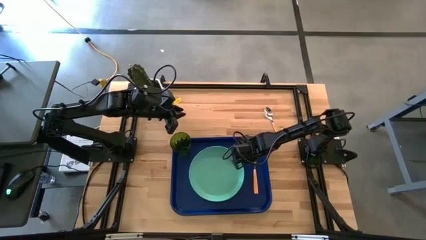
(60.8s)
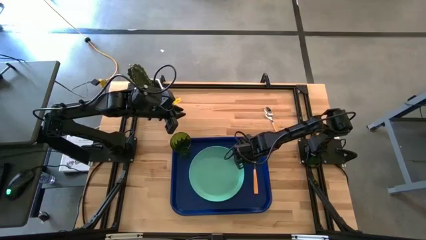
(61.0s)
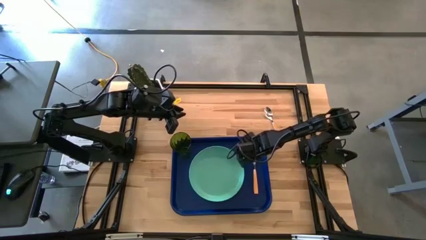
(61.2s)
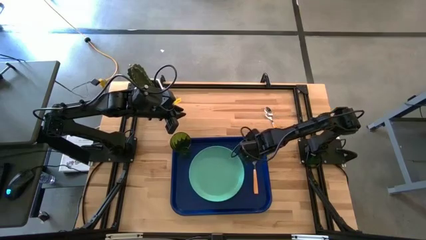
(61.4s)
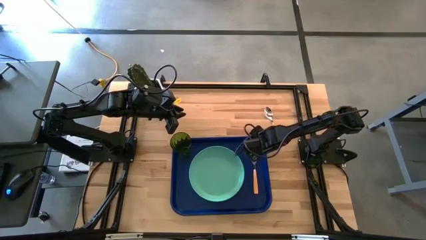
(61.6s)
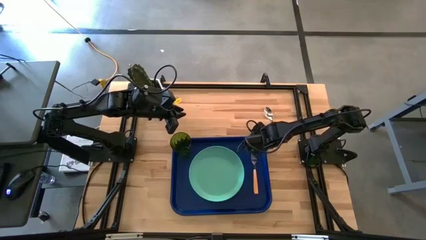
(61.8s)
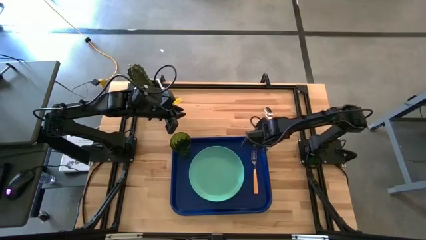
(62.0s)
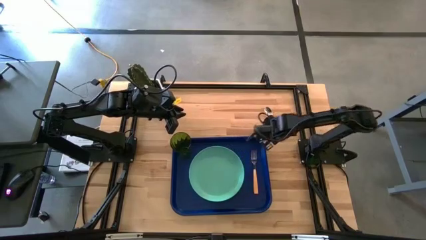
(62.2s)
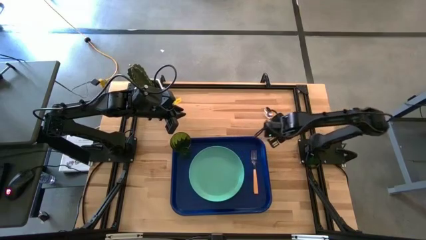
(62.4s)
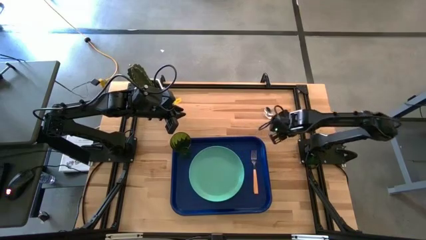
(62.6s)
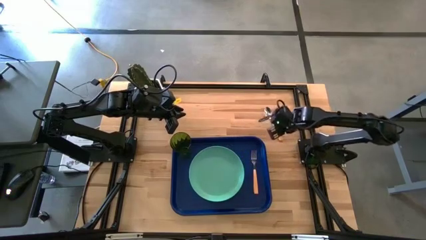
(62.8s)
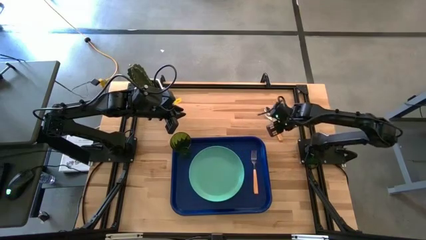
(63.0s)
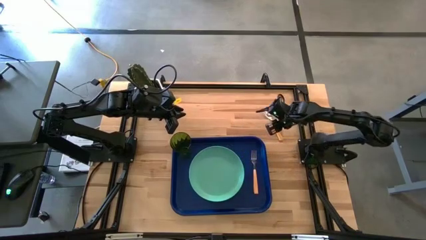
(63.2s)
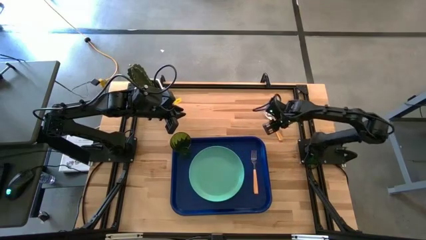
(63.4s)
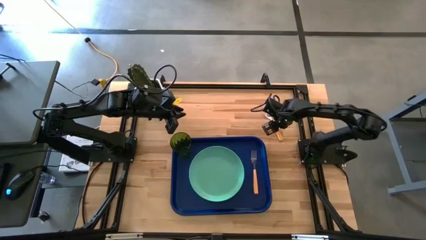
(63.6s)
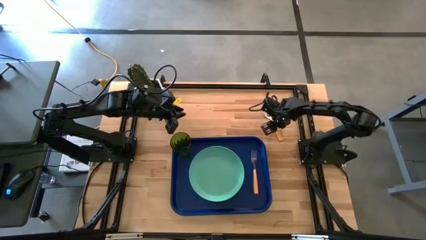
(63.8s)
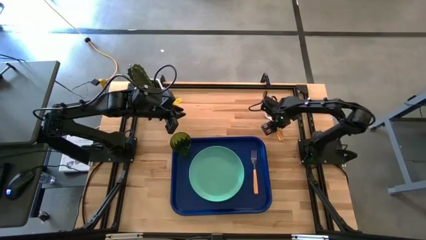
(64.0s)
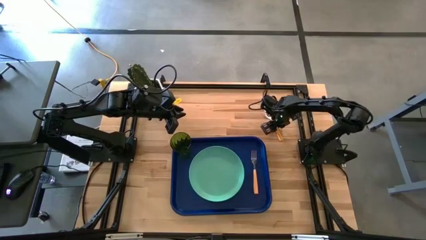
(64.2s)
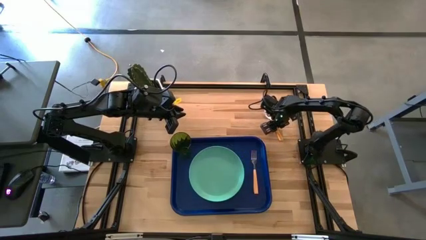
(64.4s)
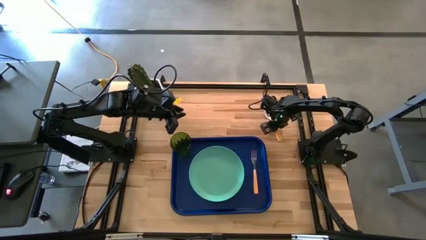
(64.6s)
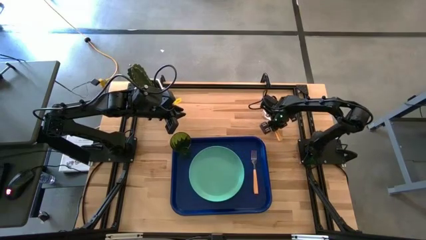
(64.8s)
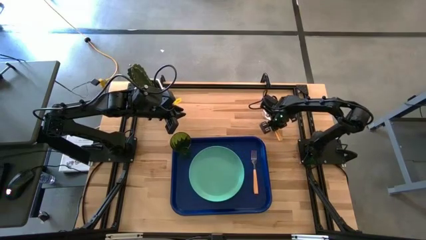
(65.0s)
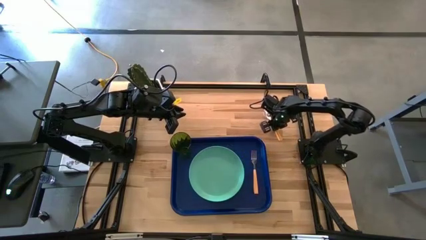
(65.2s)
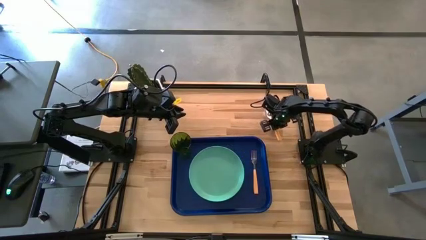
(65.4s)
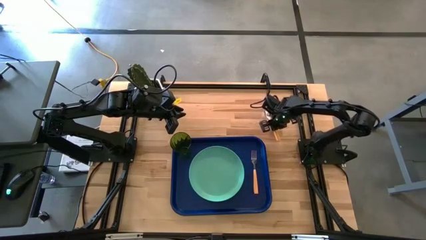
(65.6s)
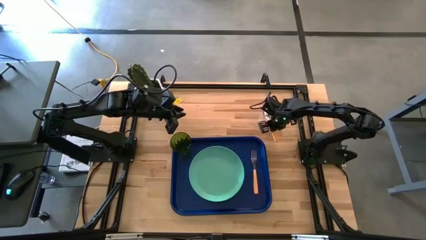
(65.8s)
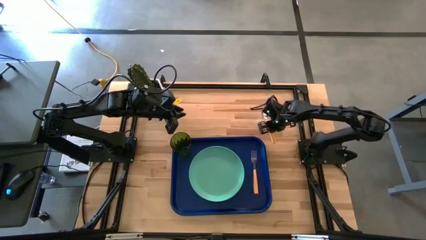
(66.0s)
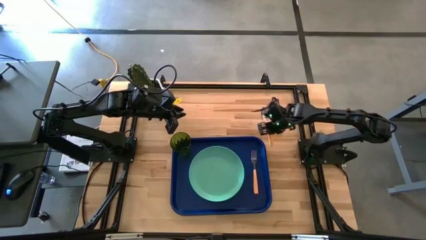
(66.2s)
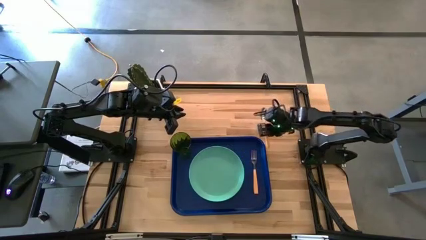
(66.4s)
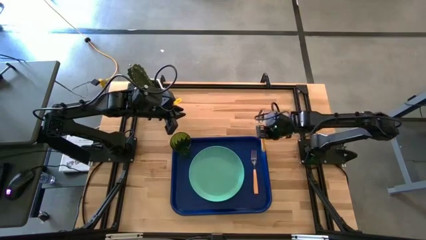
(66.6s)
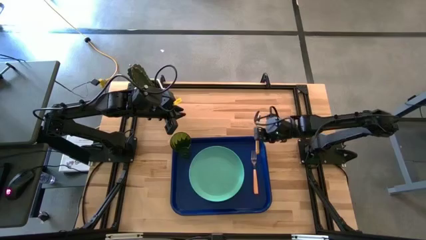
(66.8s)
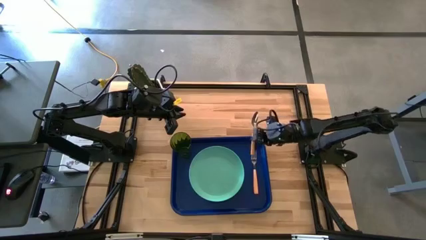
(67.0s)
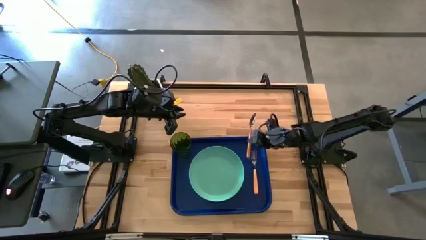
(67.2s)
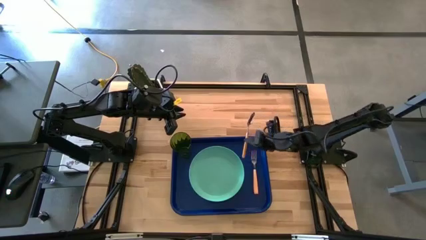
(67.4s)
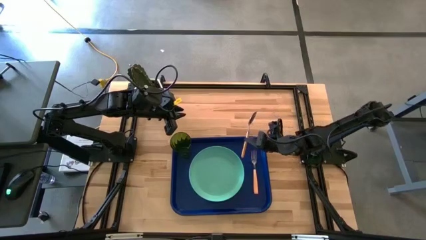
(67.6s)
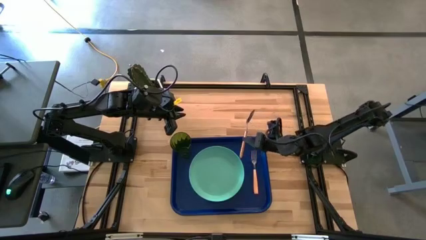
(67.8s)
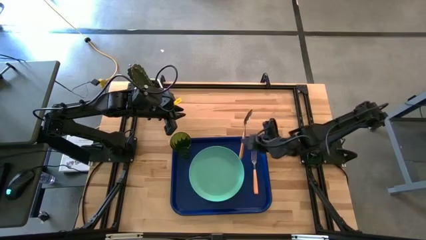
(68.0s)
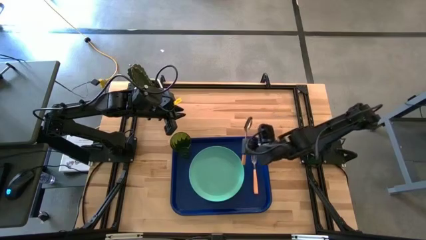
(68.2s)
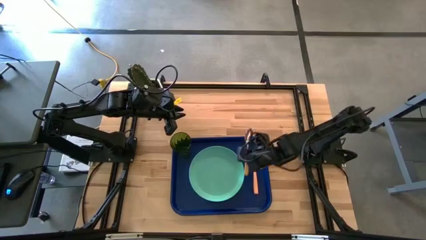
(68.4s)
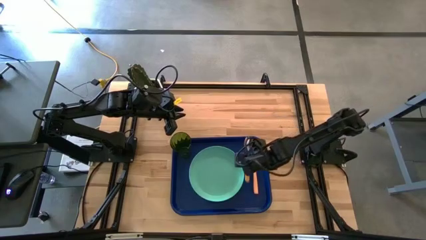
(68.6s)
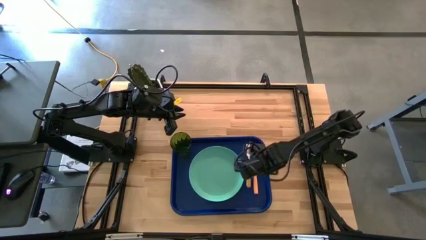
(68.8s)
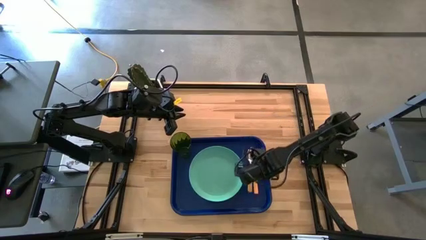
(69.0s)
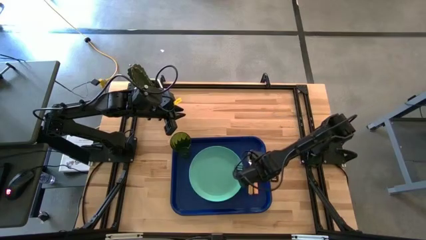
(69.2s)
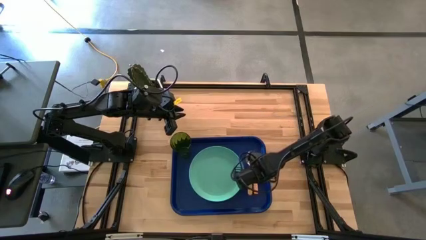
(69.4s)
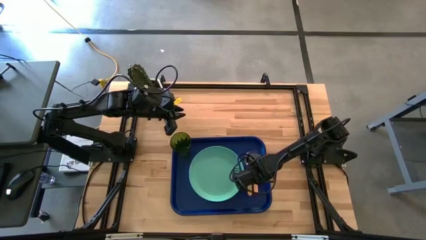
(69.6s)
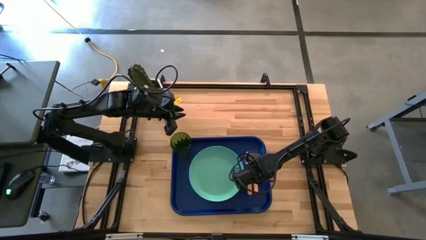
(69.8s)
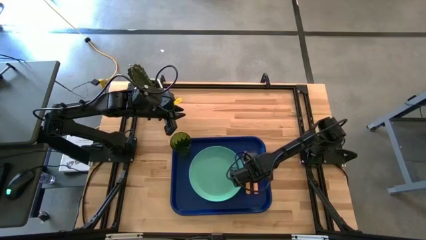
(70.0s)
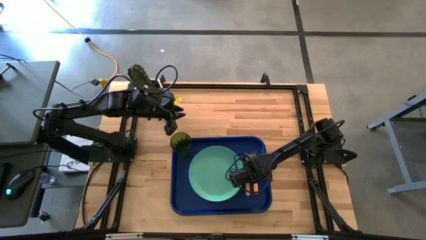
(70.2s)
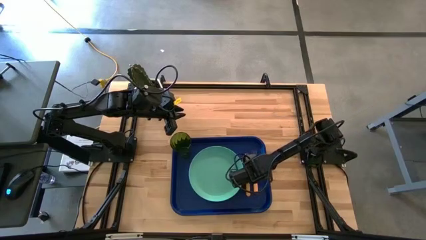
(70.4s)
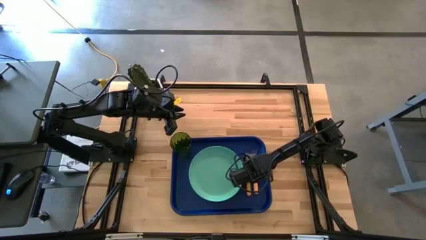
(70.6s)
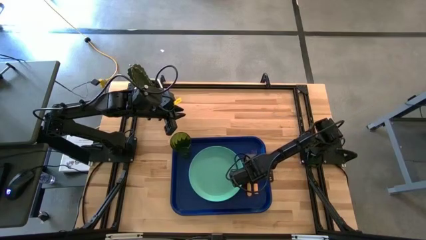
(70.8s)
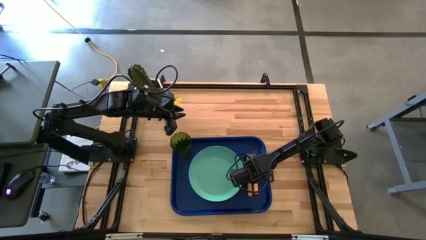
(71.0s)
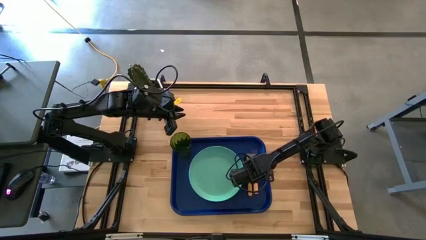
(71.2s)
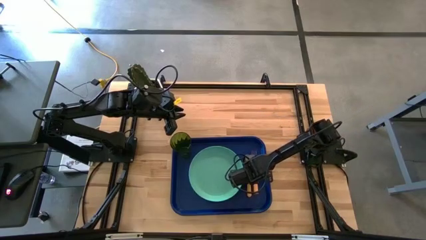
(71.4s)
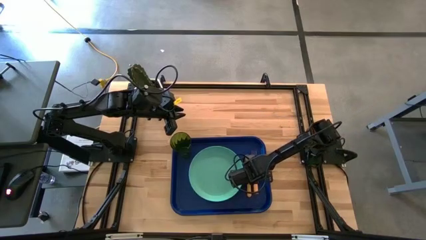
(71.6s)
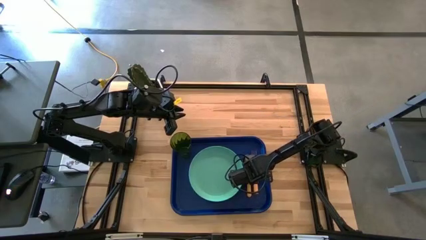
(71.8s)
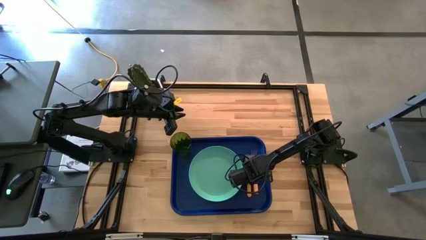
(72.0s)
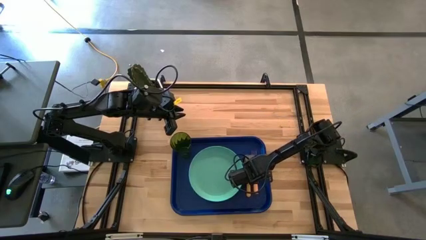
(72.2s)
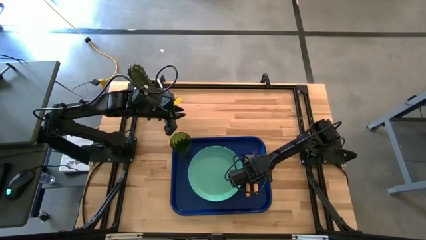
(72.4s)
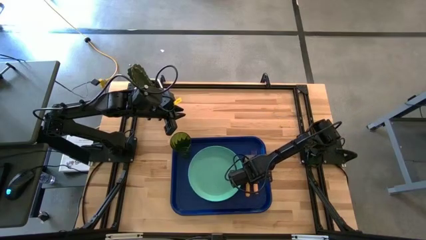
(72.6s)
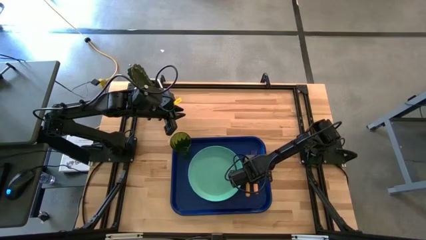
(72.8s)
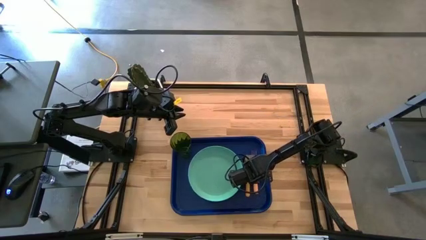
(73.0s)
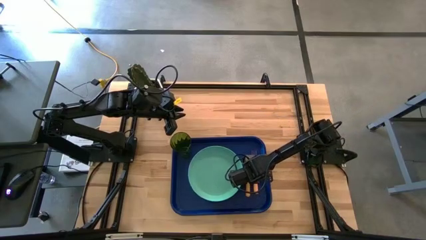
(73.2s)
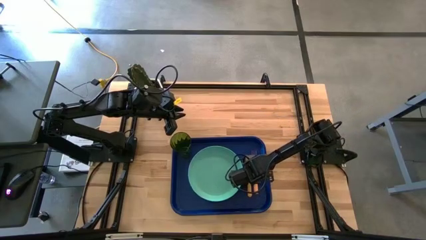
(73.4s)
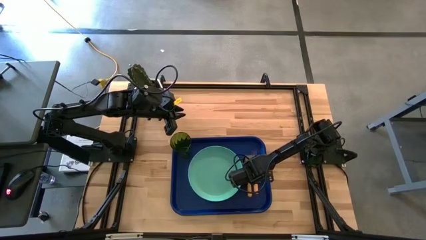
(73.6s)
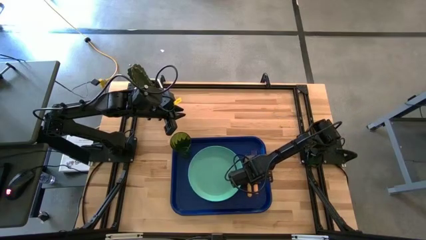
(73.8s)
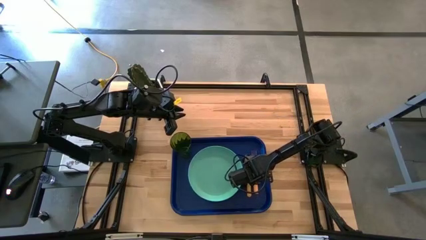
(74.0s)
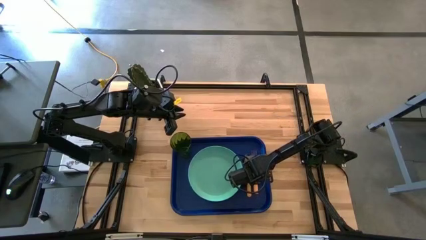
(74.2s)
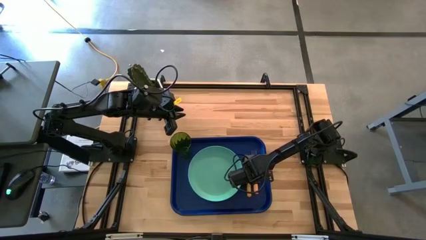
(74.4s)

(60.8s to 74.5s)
Task: Pick and place plate/cup/fork/spoon on tray
Put the orange spoon on the blue tray to the left of the yellow fork
